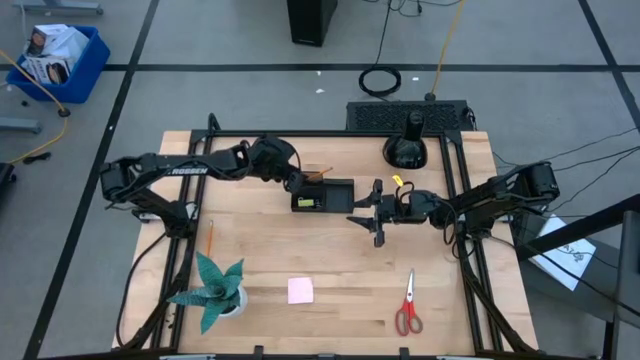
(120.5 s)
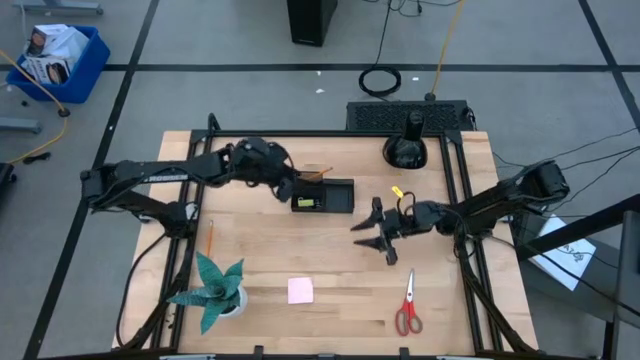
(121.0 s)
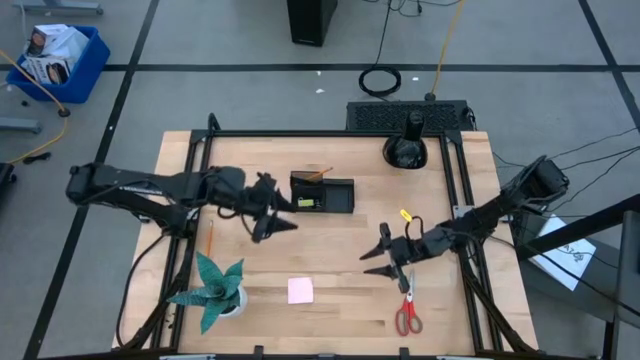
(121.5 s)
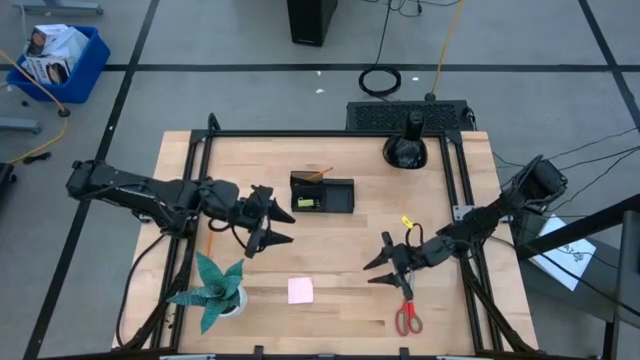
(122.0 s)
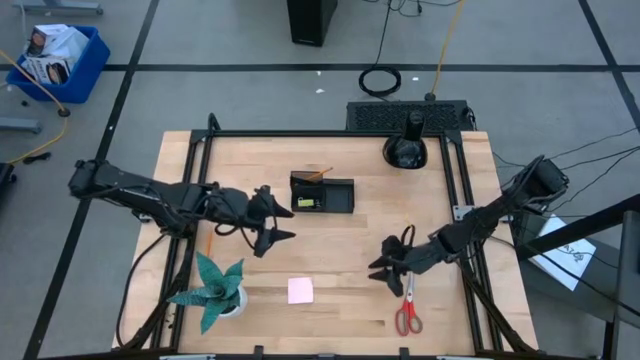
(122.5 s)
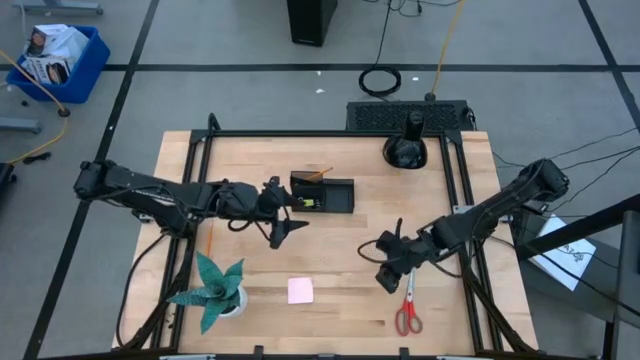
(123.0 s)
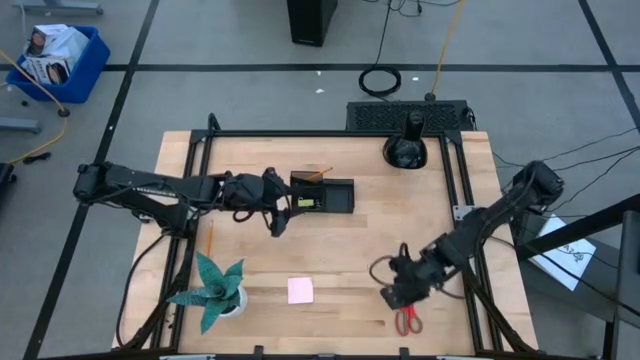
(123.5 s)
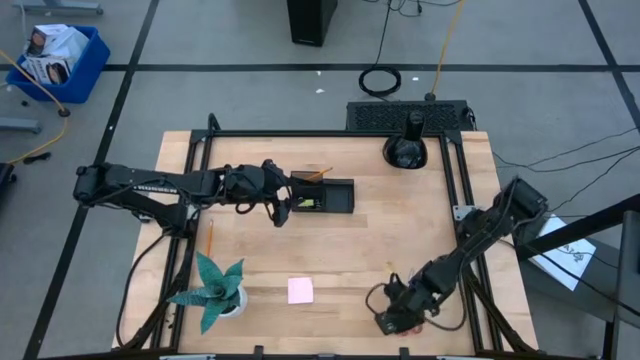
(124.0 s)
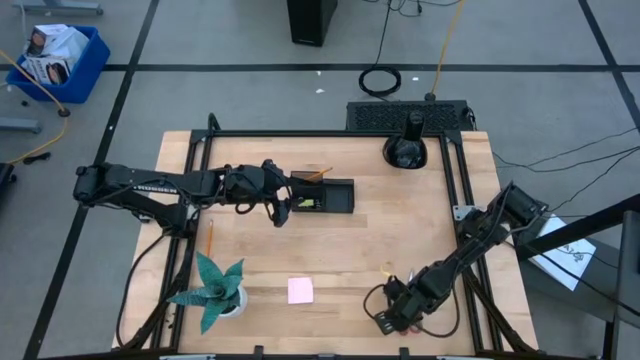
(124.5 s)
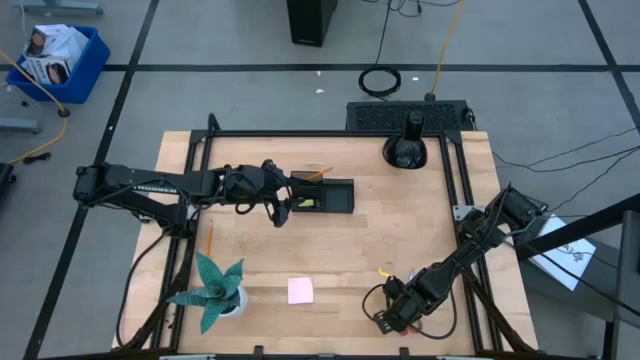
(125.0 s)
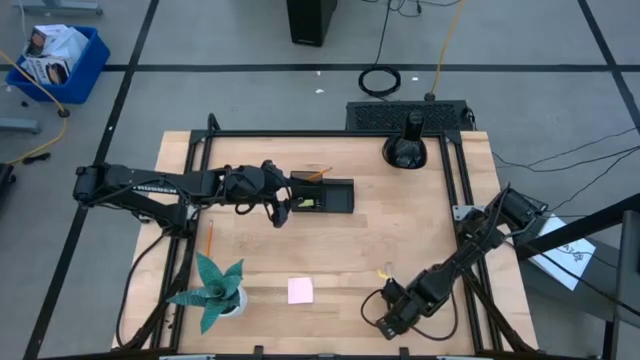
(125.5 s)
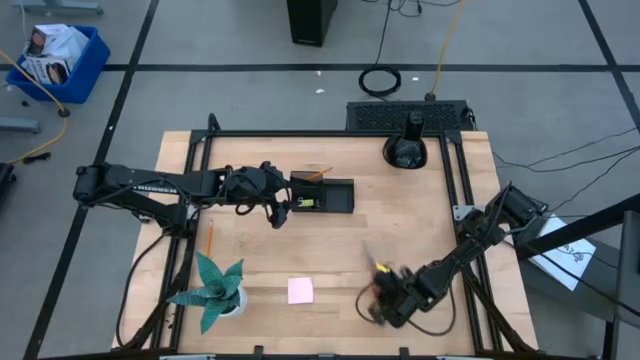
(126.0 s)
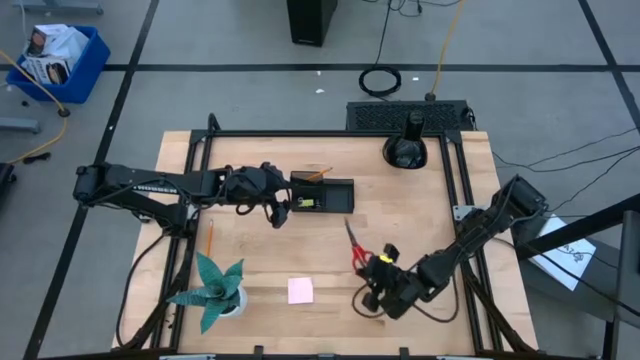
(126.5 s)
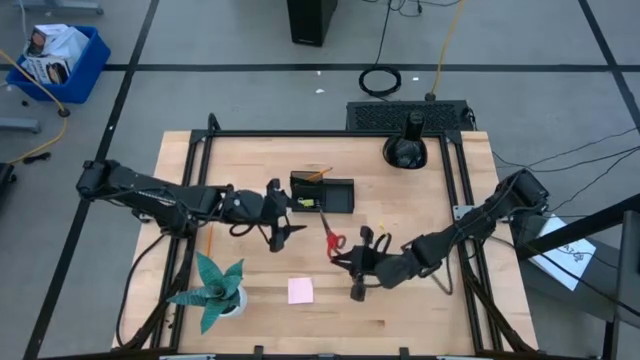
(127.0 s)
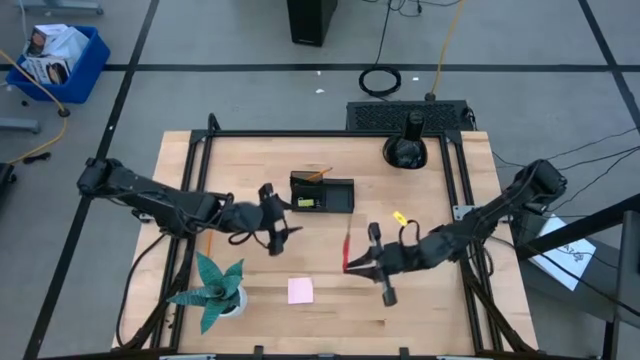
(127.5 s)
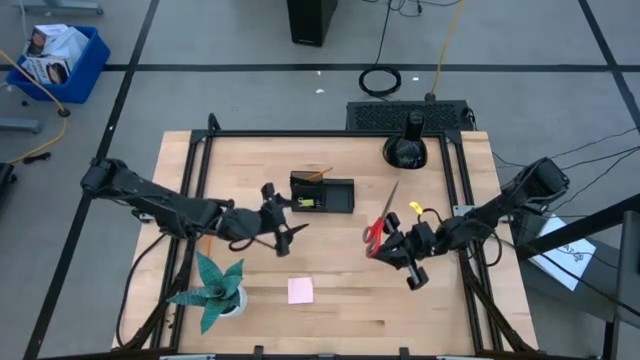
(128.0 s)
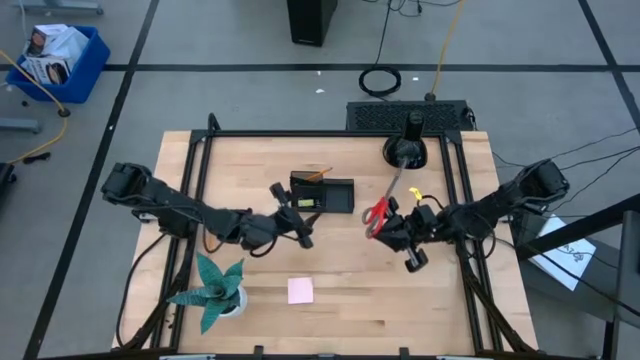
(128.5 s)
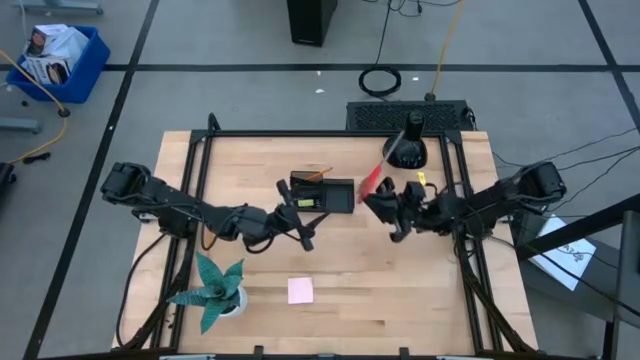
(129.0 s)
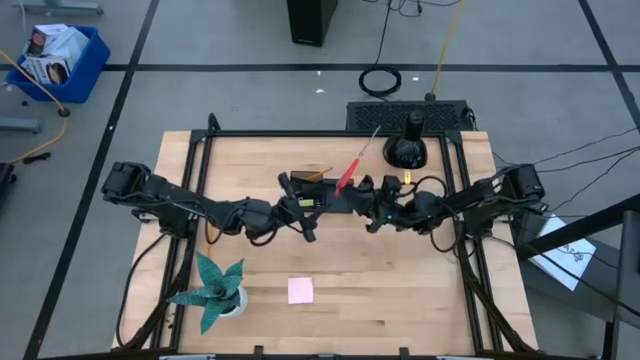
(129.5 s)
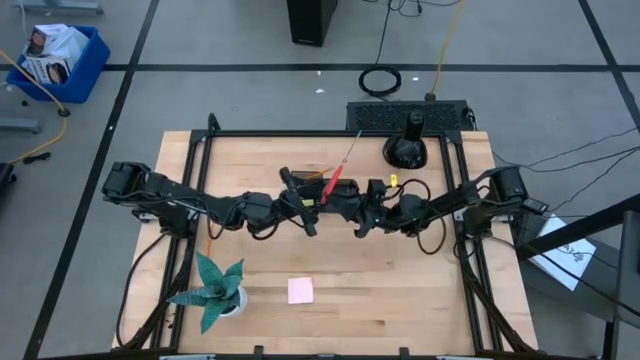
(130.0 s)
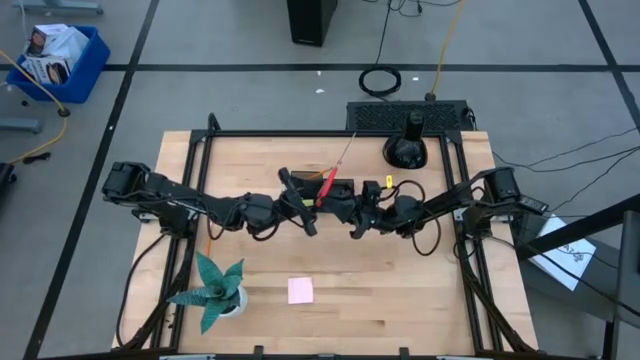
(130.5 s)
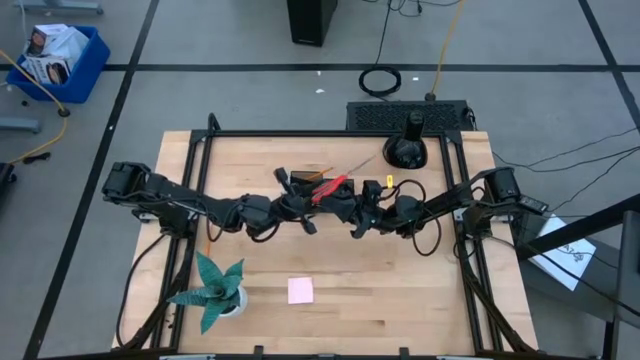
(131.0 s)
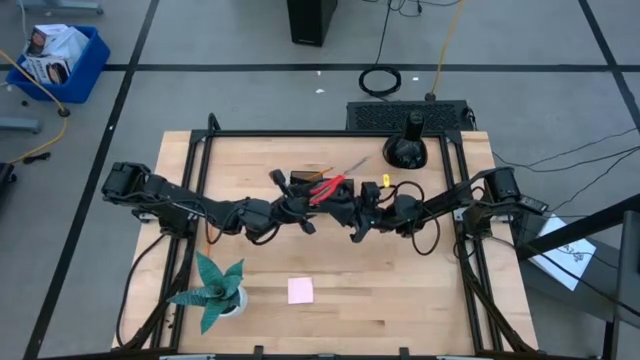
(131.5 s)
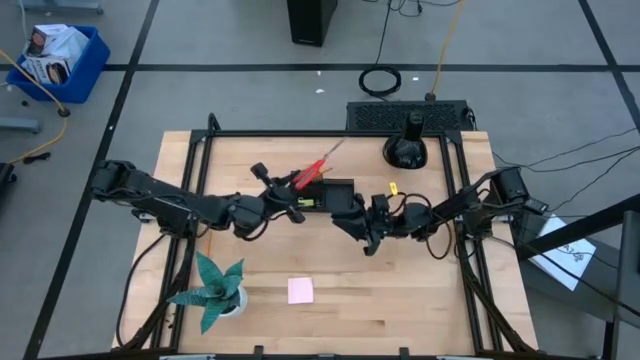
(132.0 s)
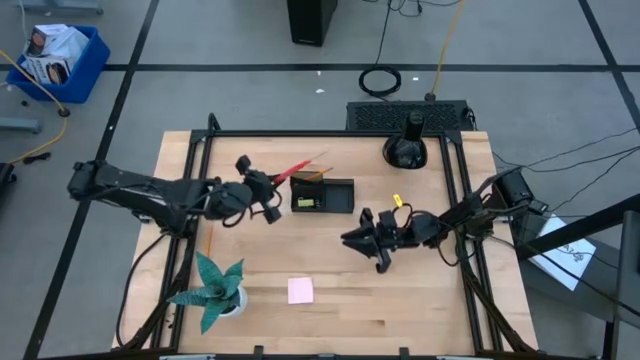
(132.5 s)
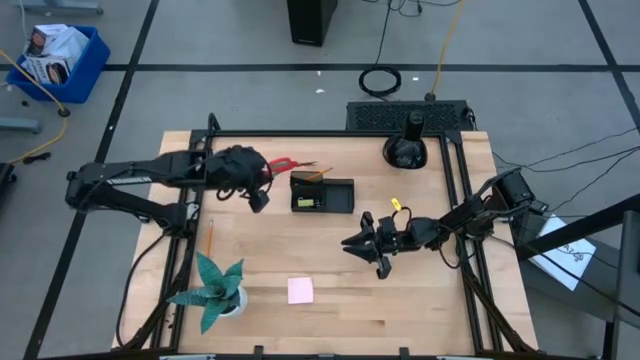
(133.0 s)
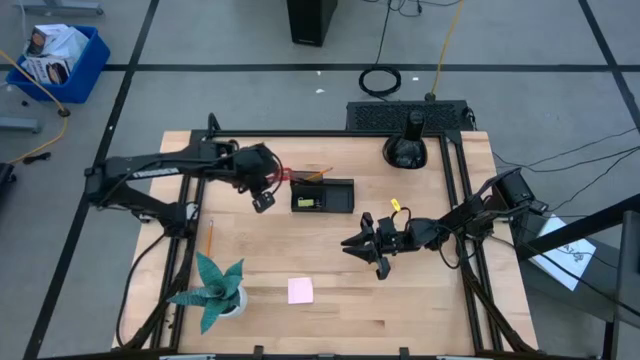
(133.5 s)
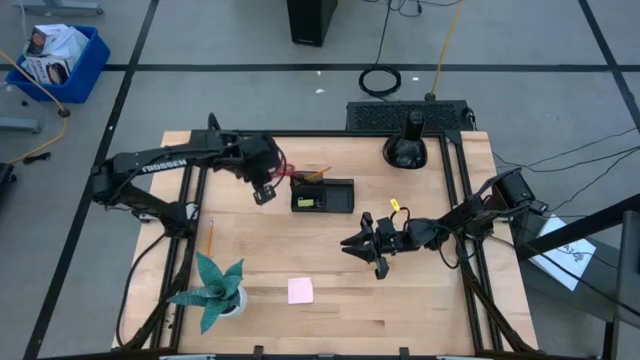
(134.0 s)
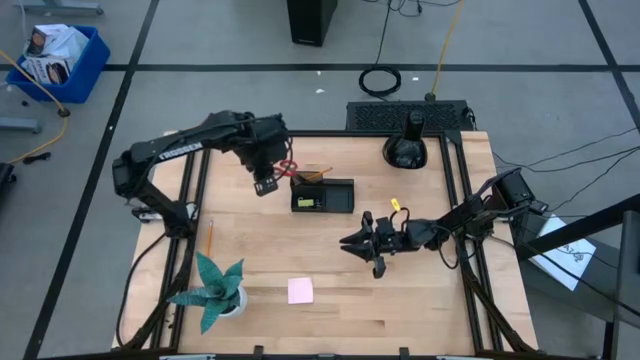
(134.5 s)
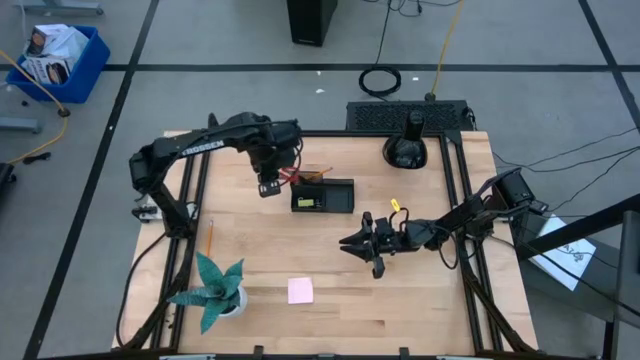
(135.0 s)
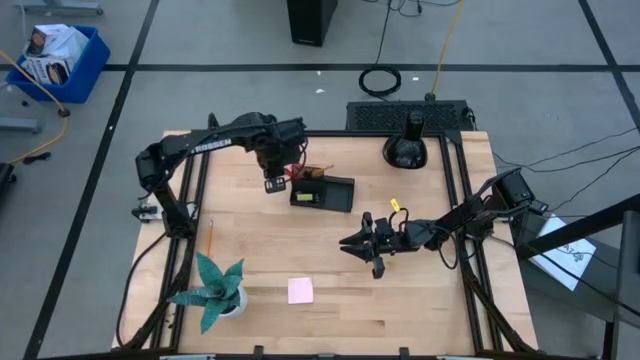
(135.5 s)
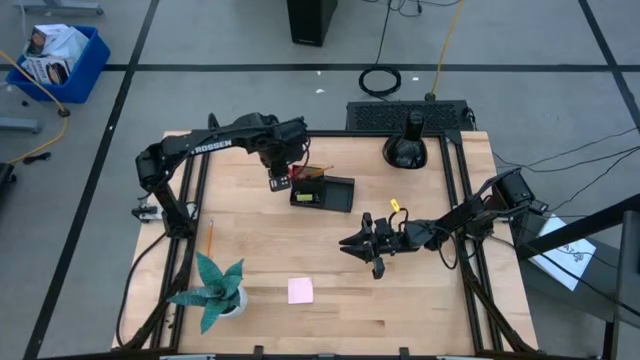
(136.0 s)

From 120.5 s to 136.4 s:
Task: Pick and place office supplies into organizer
Put the red scissors into the black desk organizer

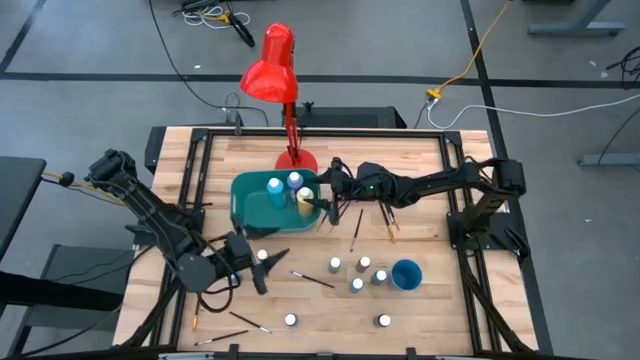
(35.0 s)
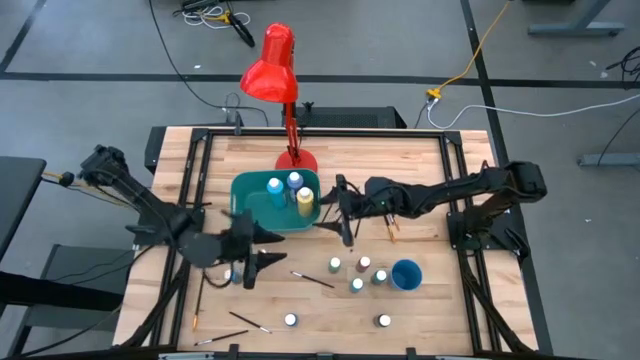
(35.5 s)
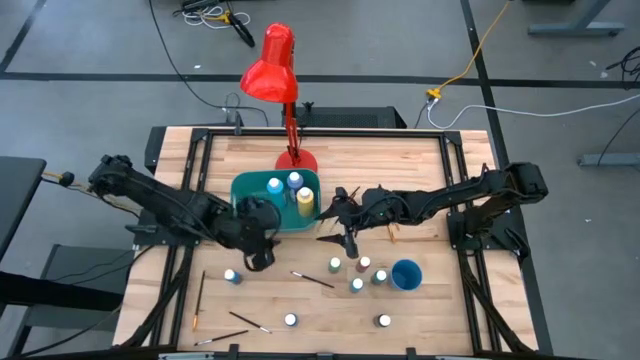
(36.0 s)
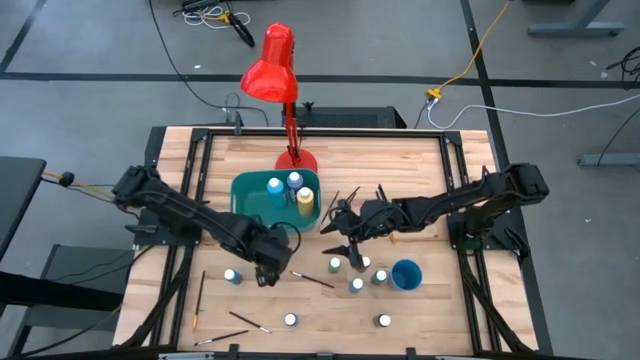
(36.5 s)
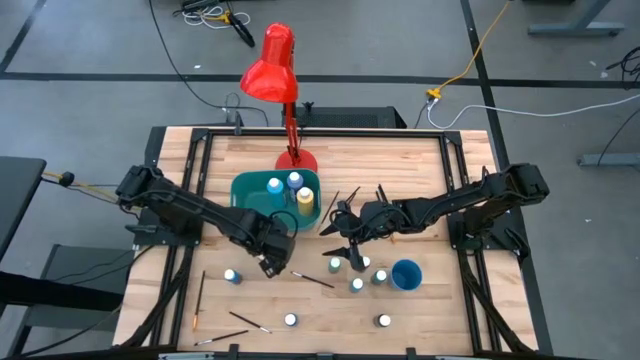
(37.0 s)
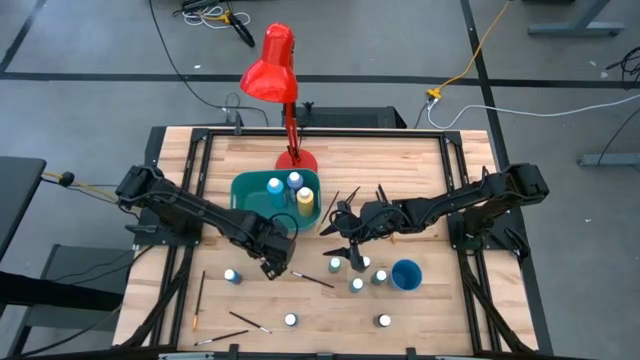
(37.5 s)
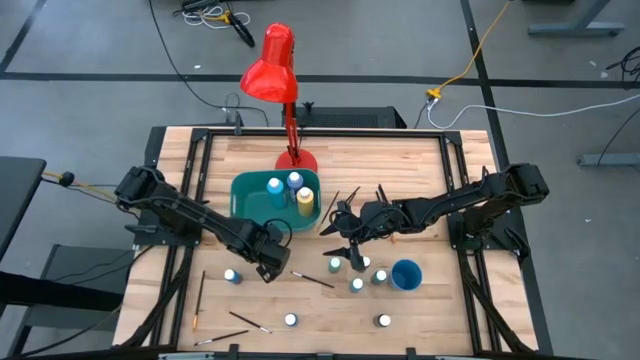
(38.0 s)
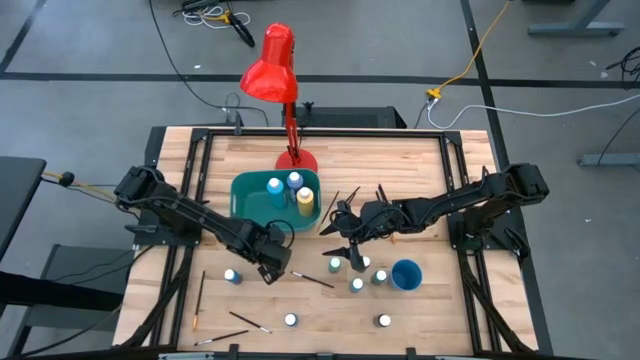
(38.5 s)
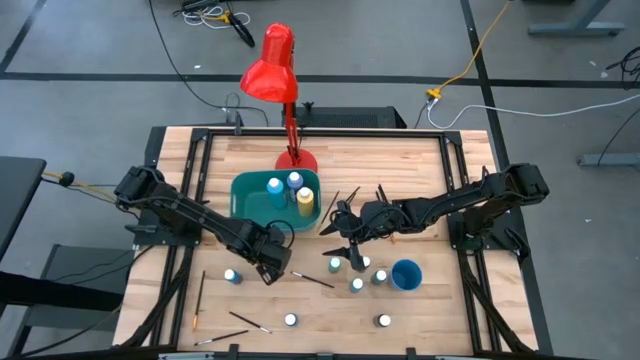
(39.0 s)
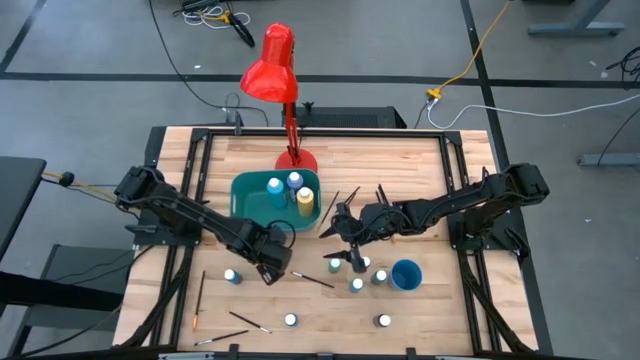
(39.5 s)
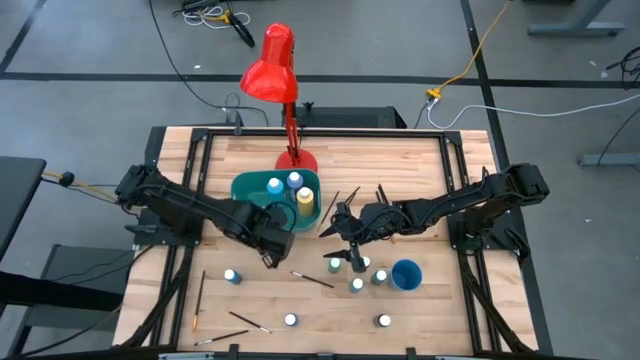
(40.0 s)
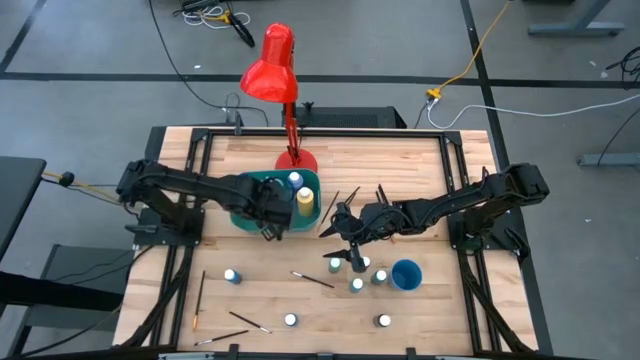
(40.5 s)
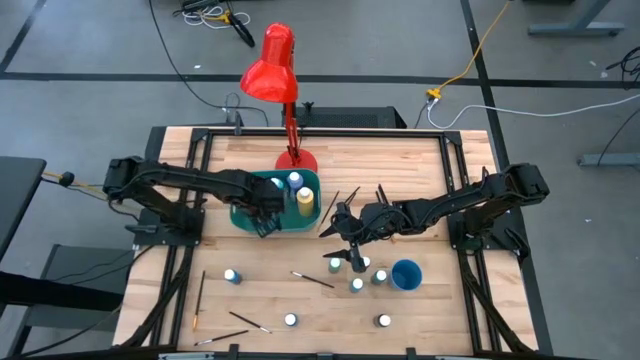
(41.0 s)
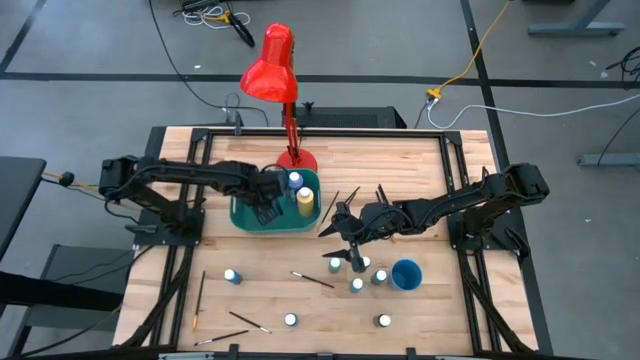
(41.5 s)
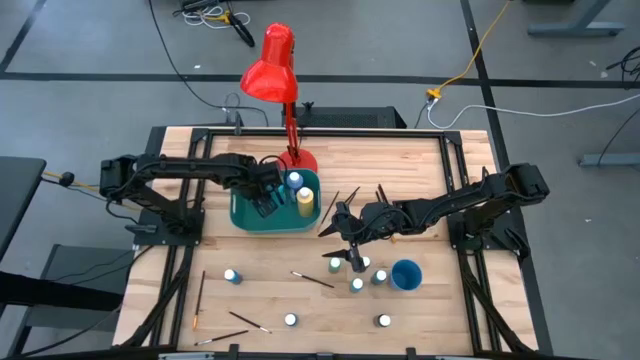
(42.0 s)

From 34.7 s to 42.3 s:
Task: Pick & Place Paint Supplies
Put the small orange paint bottle into the green bin
